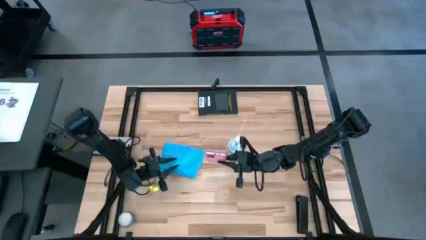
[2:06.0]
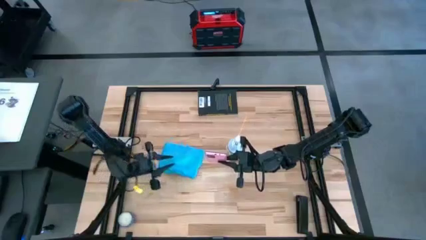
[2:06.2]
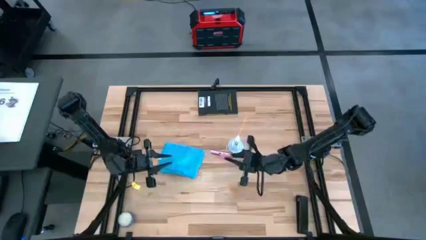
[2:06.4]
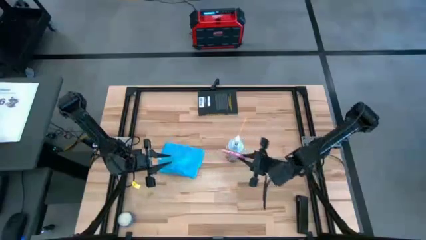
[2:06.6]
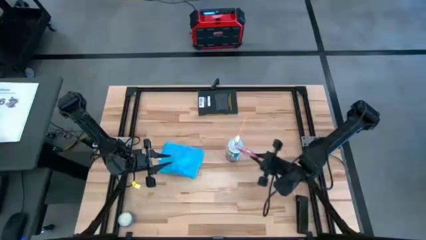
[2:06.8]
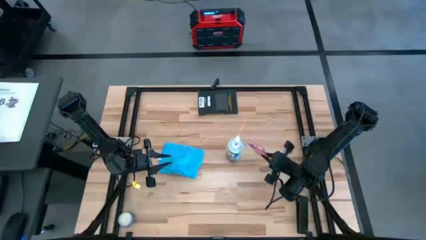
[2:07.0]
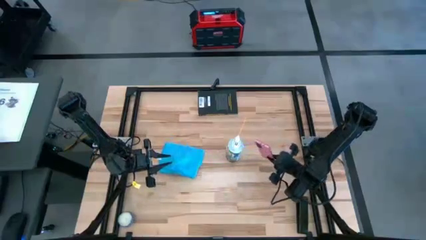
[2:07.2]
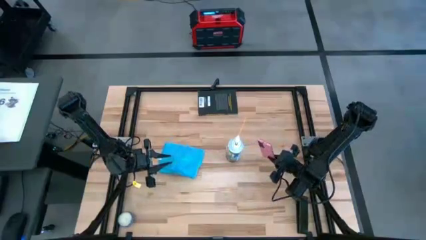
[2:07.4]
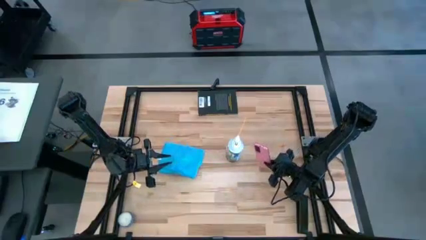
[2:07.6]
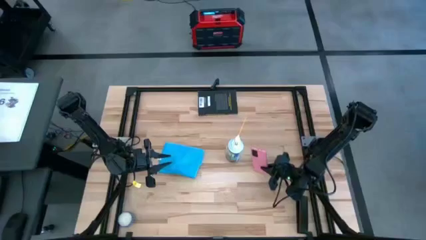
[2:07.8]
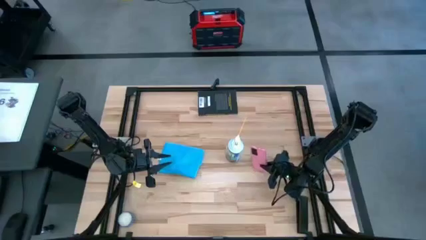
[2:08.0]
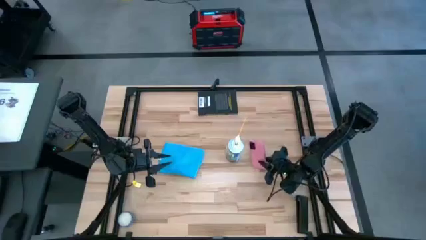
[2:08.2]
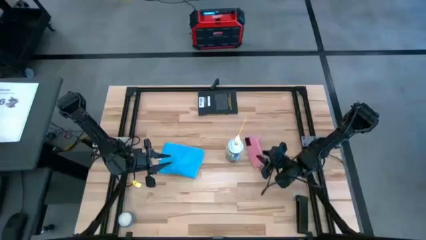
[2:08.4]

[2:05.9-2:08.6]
Task: Apply microfiber cloth
Put the cellphone to the right of the spray bottle

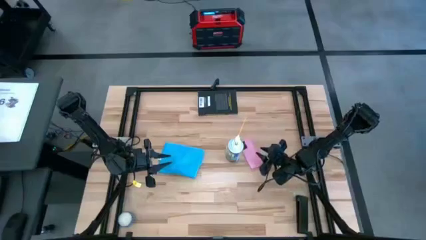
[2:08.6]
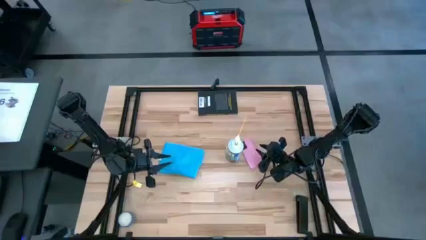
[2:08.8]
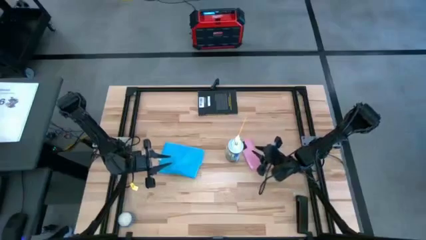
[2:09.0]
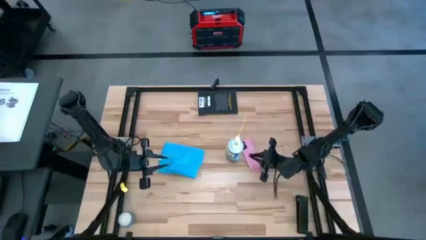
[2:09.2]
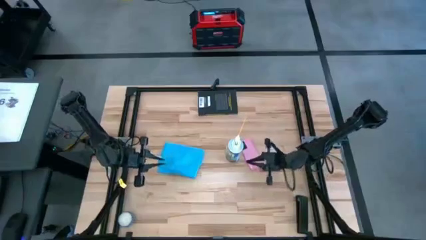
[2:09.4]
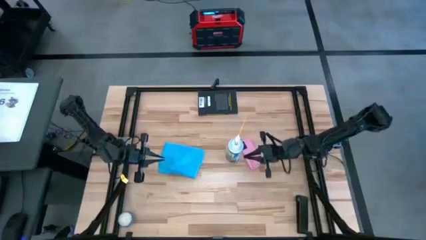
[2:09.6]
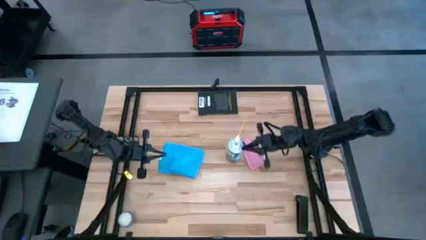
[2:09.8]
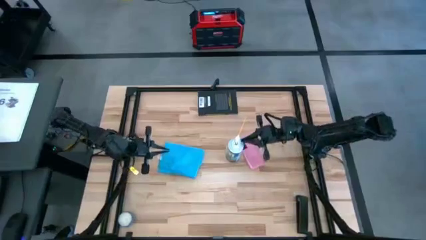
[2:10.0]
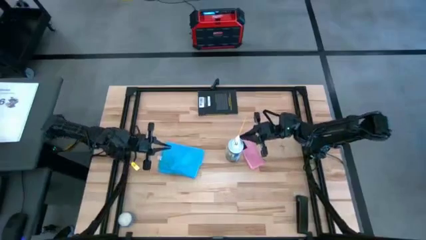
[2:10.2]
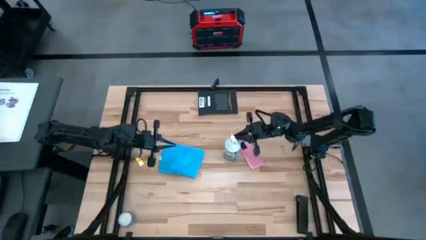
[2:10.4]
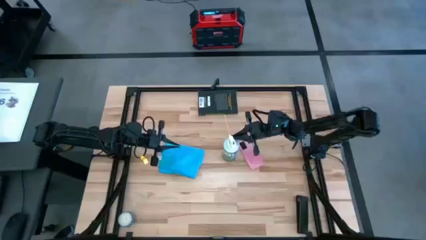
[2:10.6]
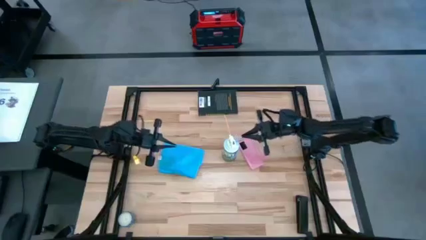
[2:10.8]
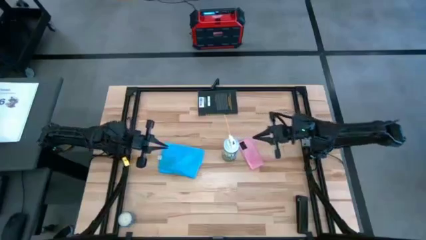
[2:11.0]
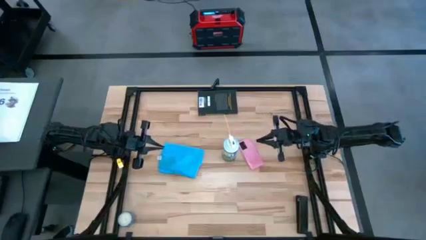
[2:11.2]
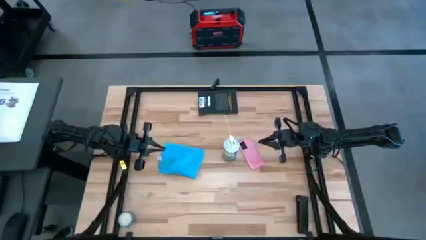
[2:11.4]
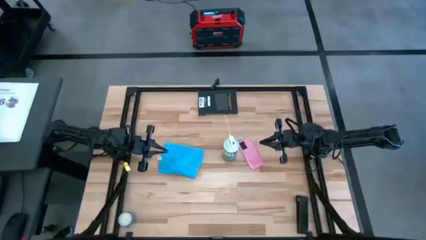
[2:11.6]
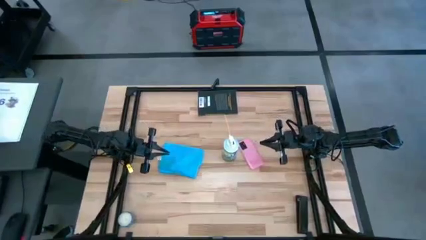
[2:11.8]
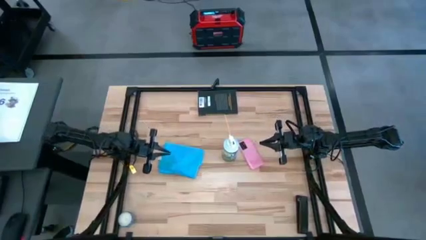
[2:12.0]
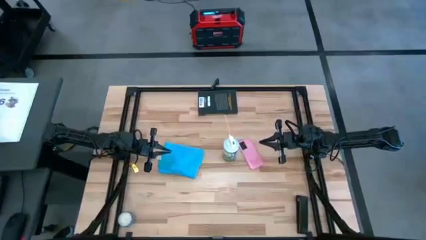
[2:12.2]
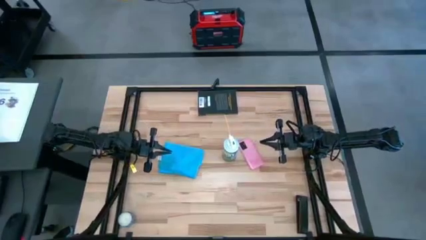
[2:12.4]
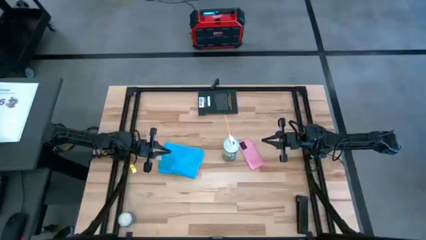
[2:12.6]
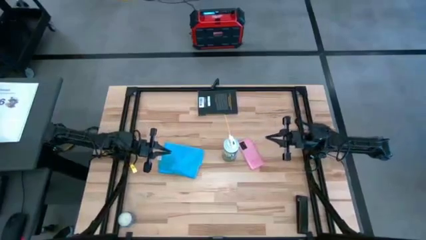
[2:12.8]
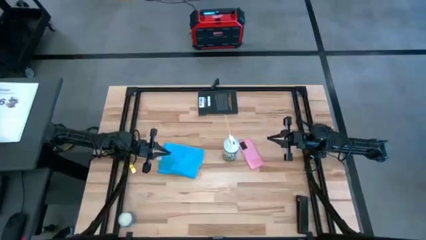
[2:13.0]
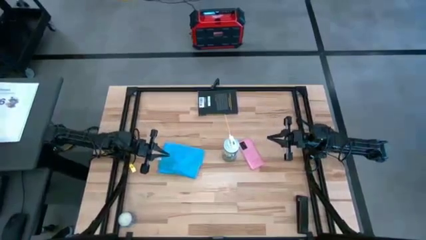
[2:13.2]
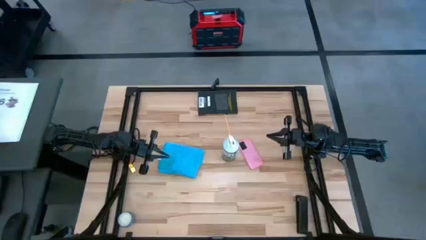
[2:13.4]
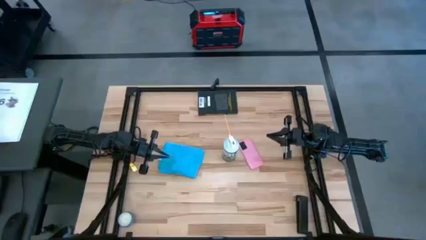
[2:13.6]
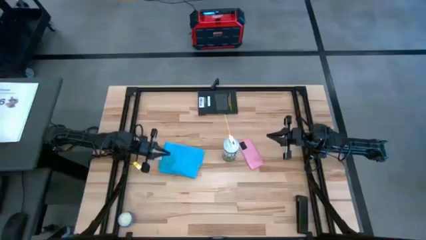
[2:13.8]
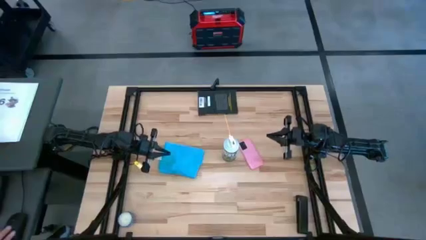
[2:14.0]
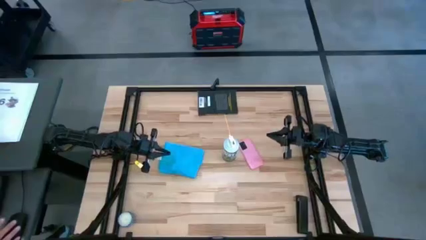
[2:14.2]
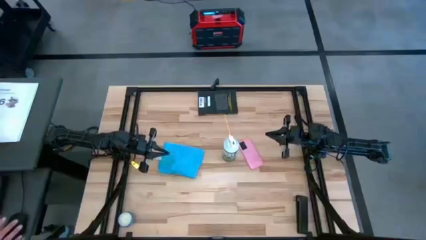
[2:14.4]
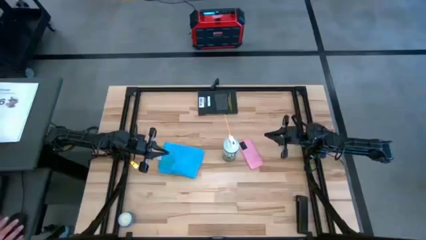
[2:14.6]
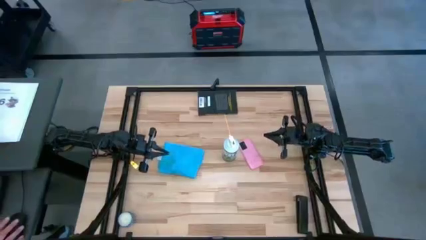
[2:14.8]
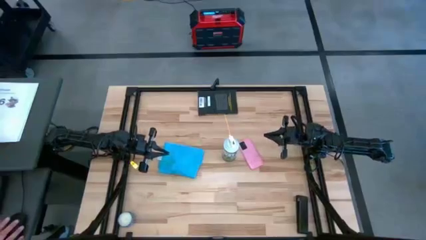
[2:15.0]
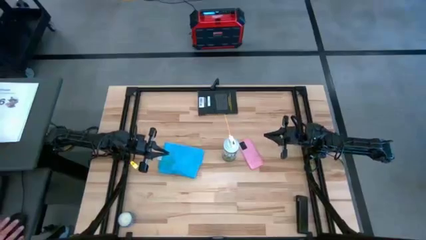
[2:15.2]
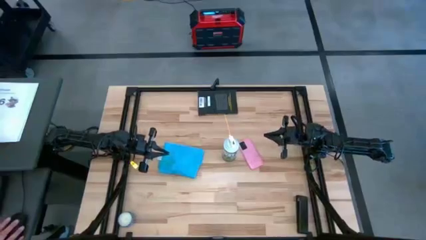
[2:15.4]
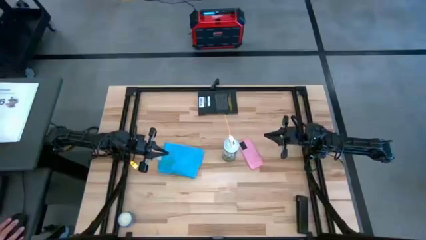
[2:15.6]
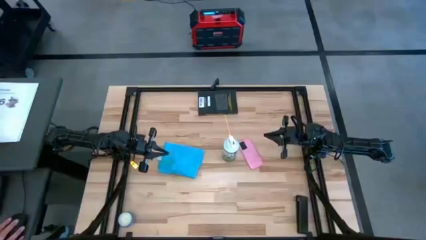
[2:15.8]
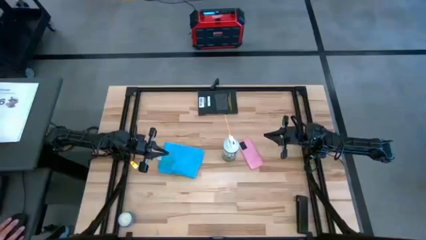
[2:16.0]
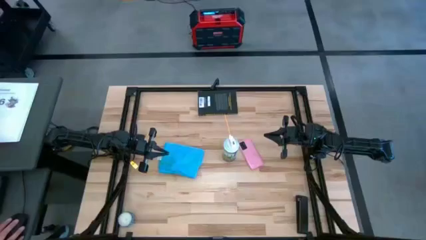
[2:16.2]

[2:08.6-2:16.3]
Return to Home Position

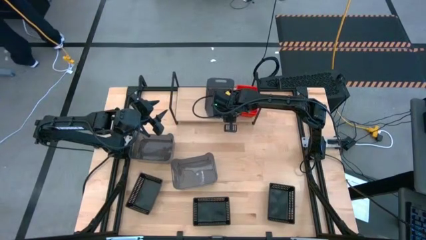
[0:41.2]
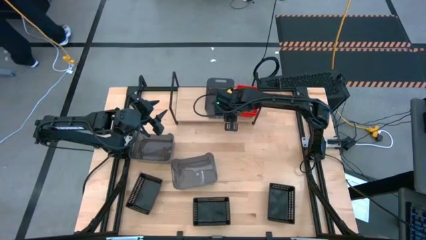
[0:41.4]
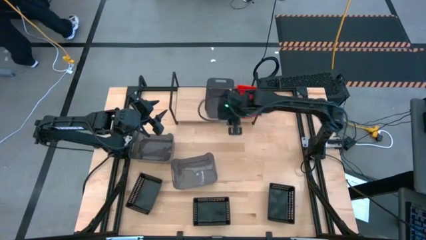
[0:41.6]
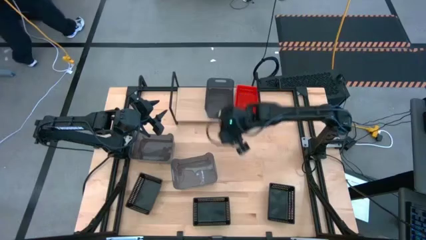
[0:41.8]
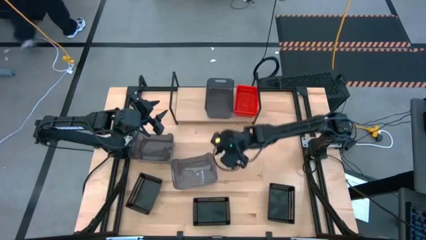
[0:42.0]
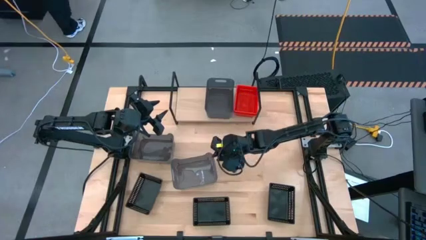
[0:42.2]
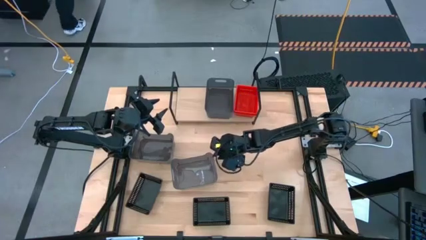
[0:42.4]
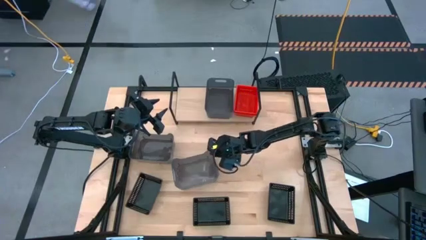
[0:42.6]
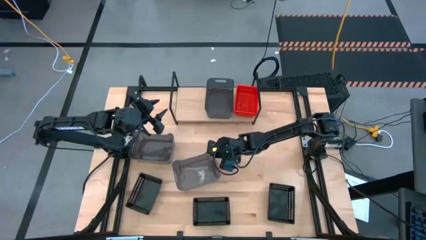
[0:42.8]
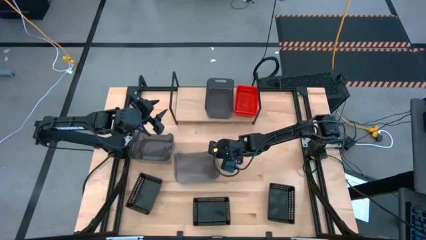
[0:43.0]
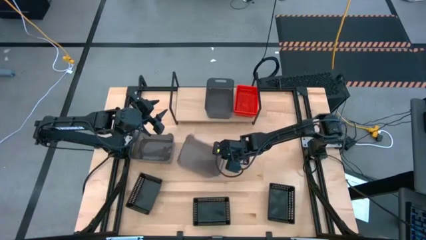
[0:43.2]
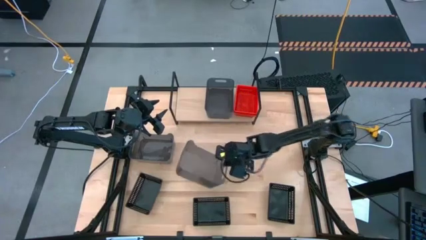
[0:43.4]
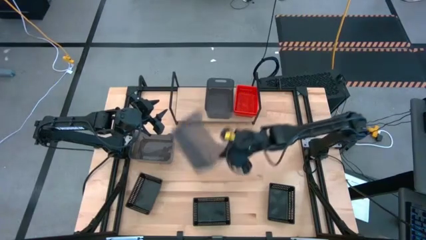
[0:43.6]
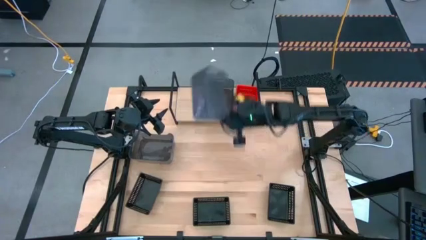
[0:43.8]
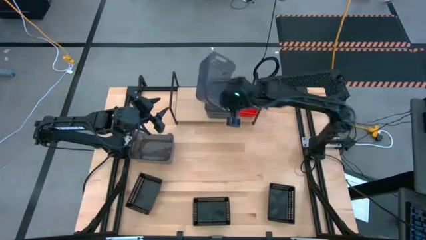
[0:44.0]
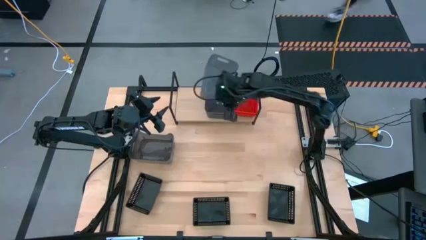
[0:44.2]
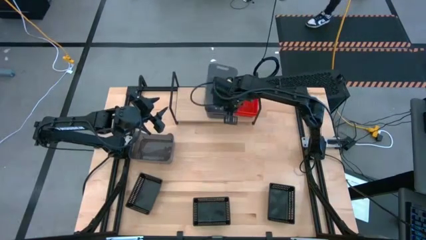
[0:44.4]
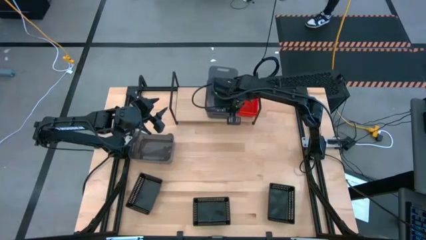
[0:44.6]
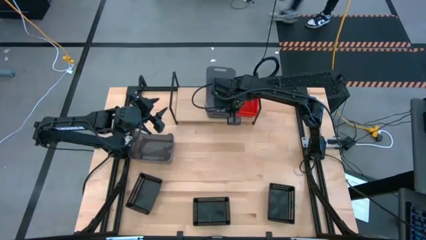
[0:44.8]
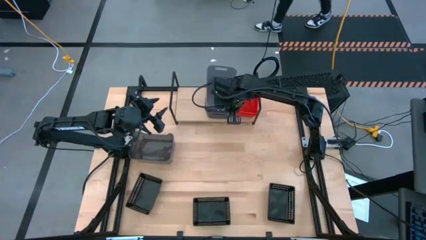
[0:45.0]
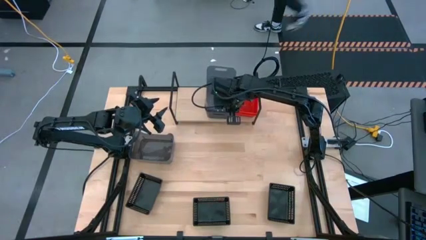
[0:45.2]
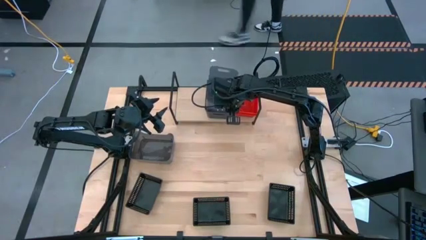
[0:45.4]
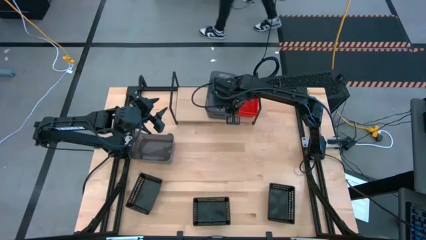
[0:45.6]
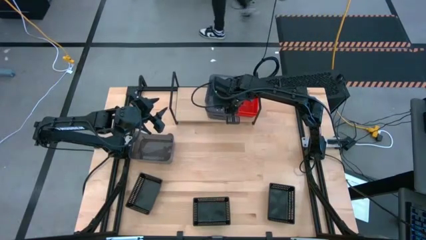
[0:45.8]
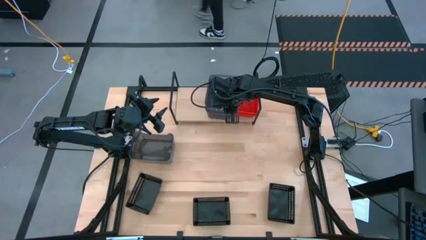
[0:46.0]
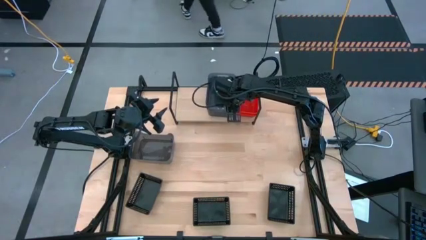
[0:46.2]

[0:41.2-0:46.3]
Task: Stack baskets on shelf by color
Stack the right light black bin on top of the other light black bin on the shelf
